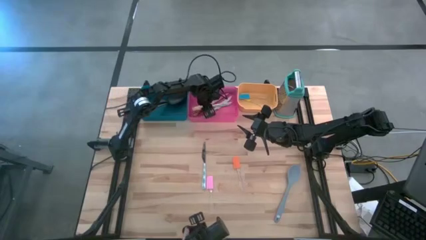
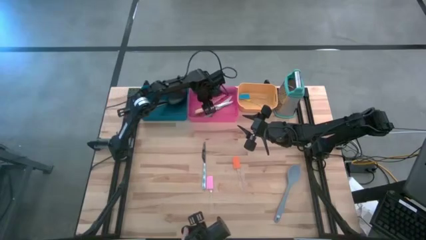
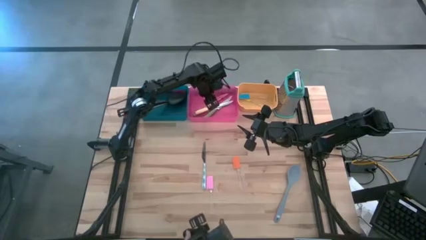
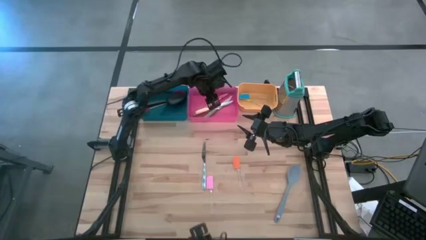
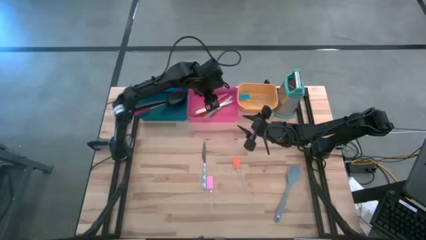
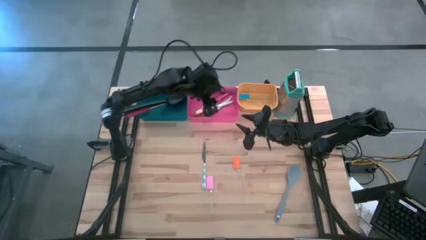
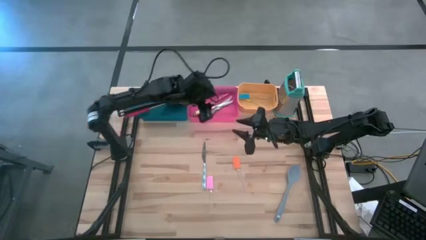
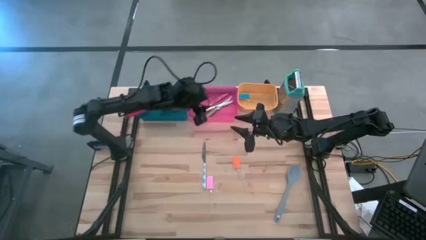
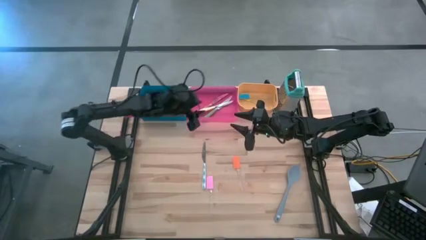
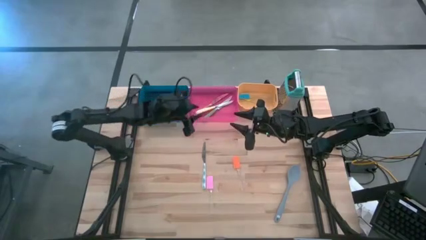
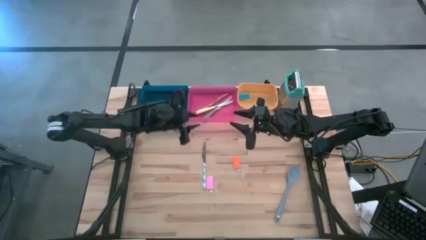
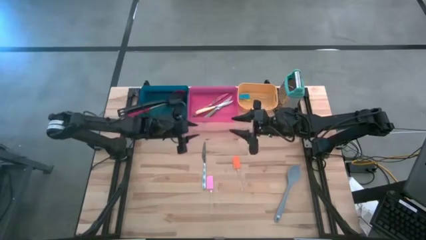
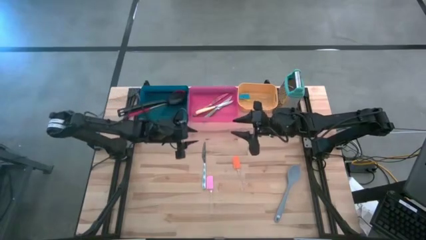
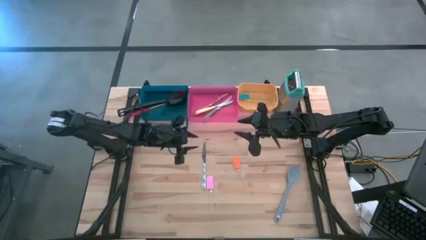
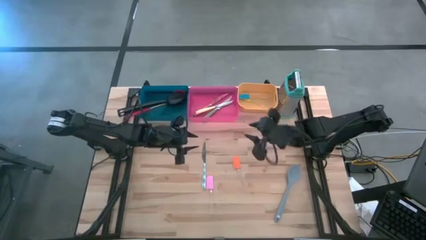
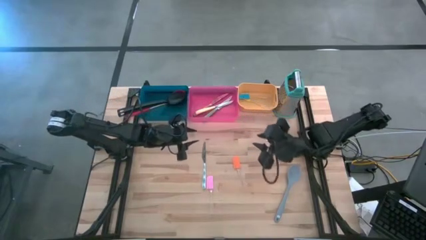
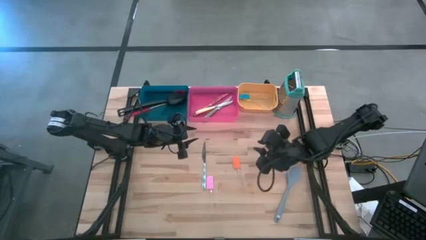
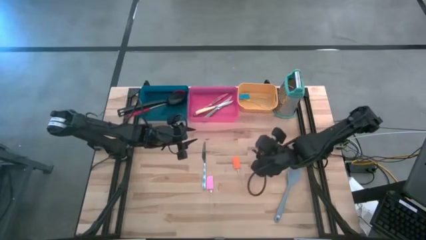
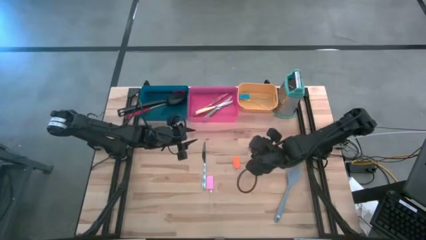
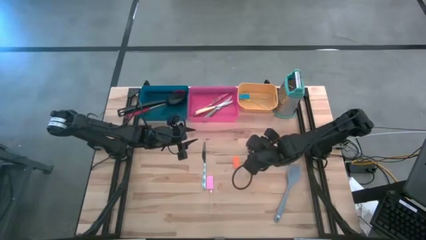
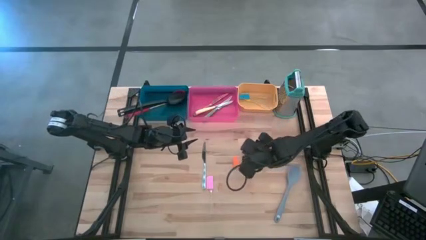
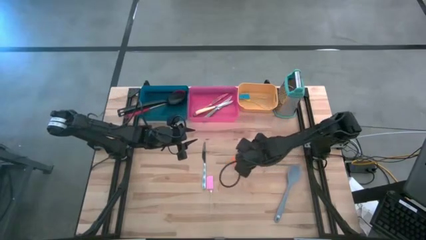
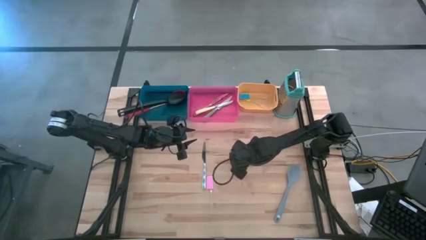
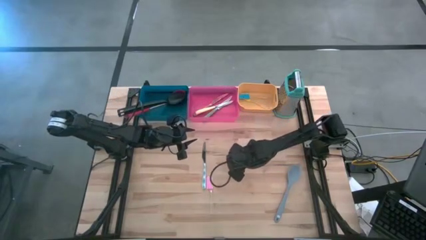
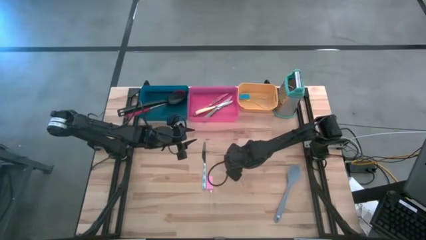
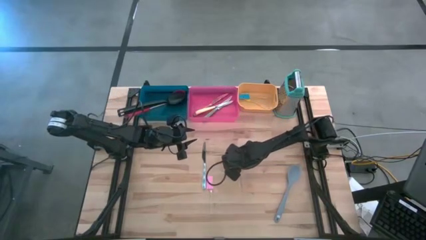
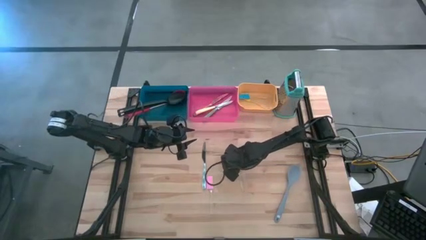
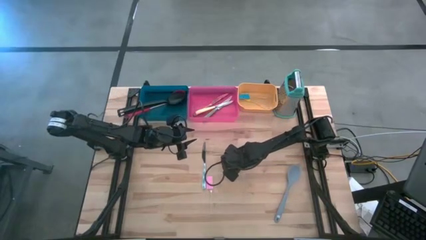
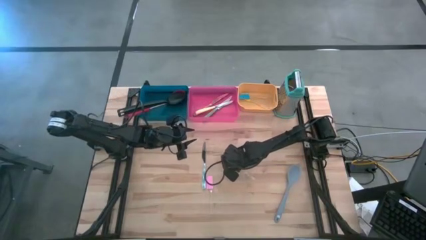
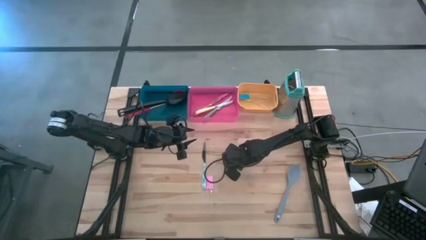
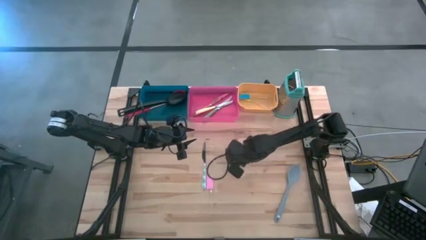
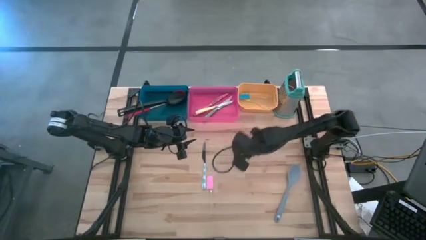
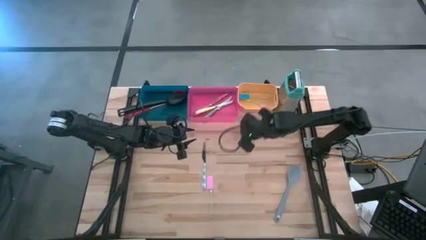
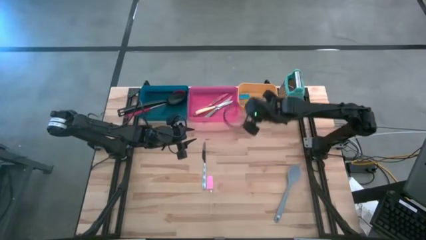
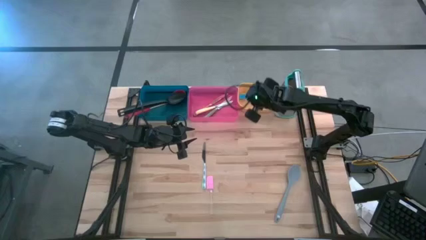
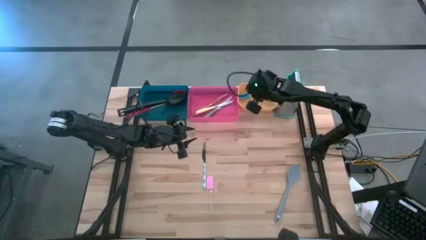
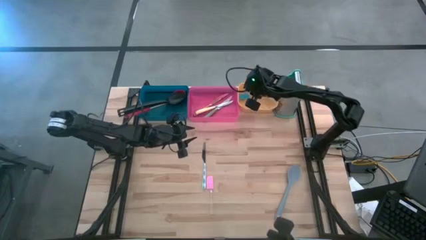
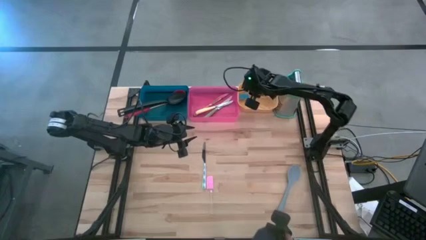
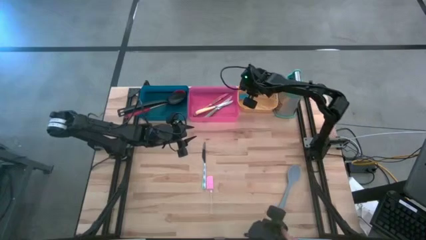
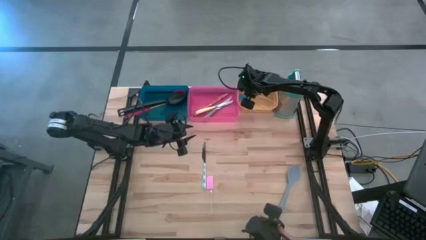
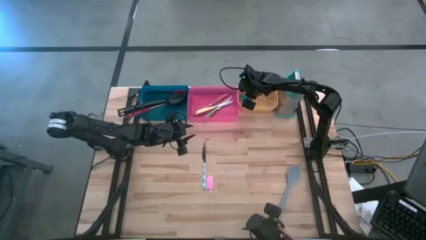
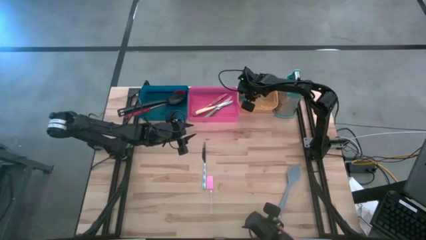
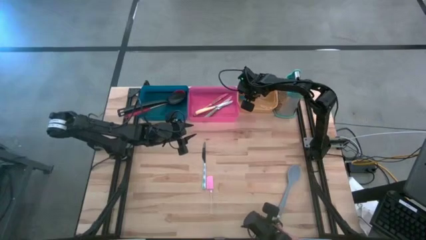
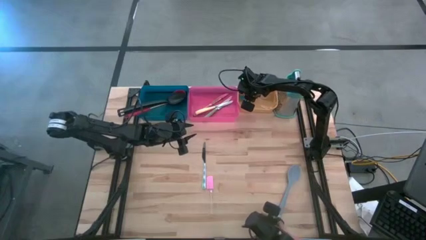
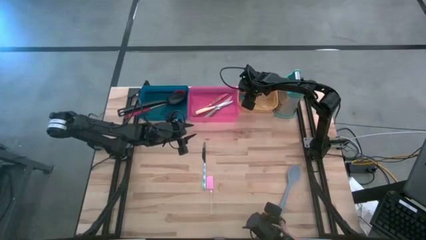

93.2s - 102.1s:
Task: Pick & Place Kitchen Items
Put the orange spatula into the yellow bin
